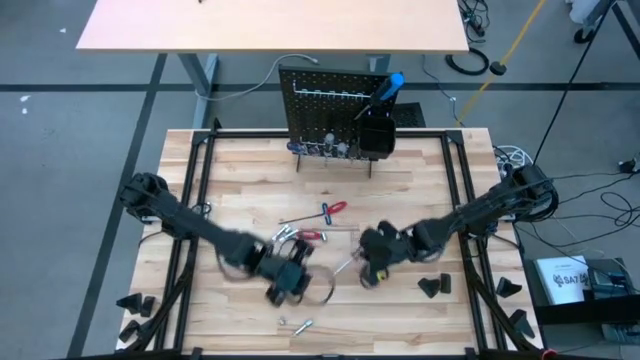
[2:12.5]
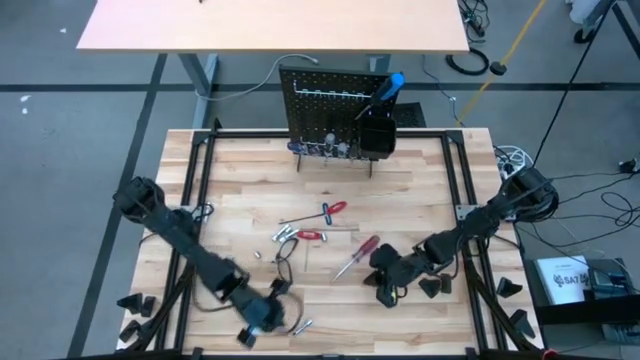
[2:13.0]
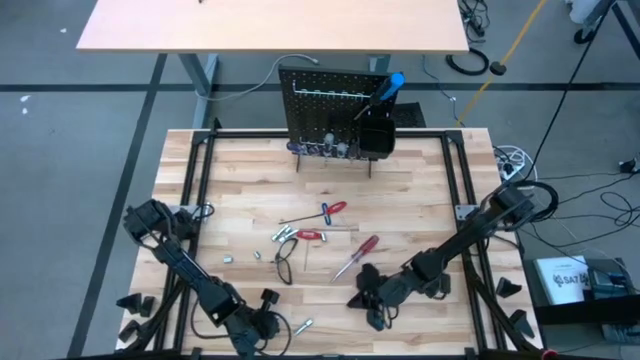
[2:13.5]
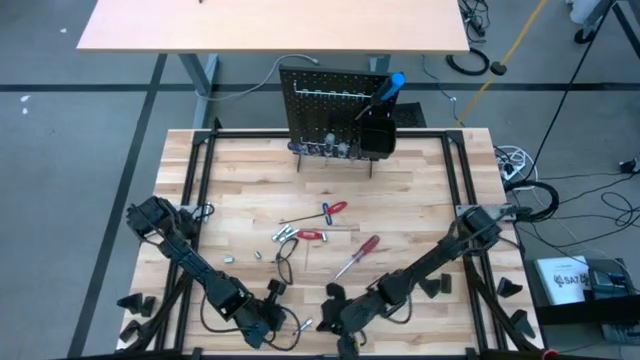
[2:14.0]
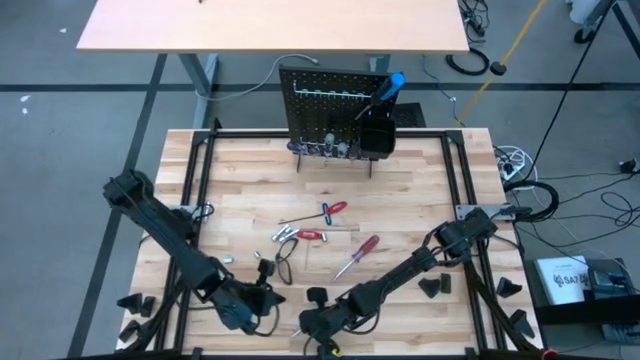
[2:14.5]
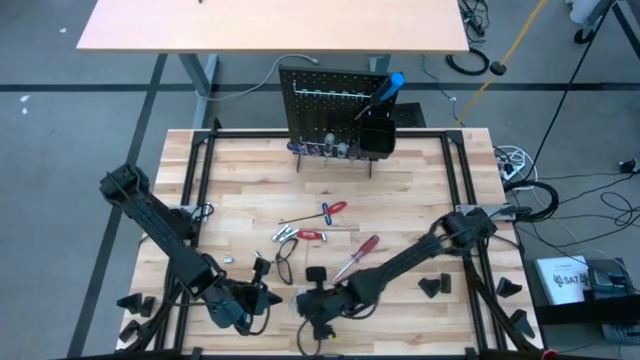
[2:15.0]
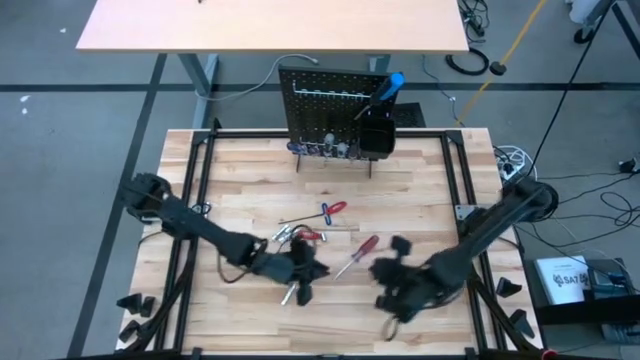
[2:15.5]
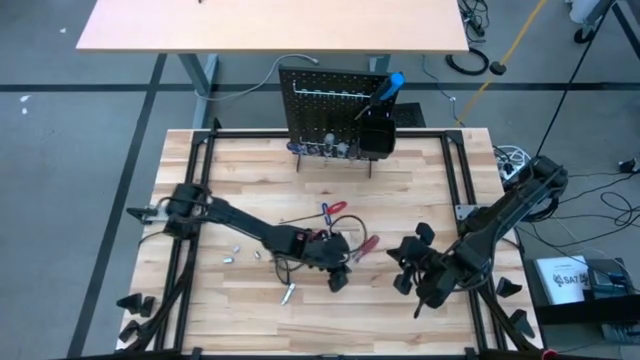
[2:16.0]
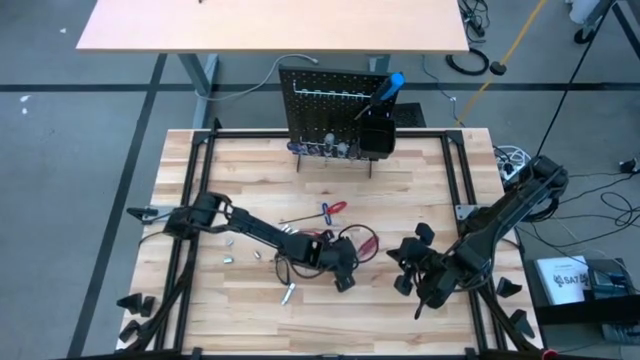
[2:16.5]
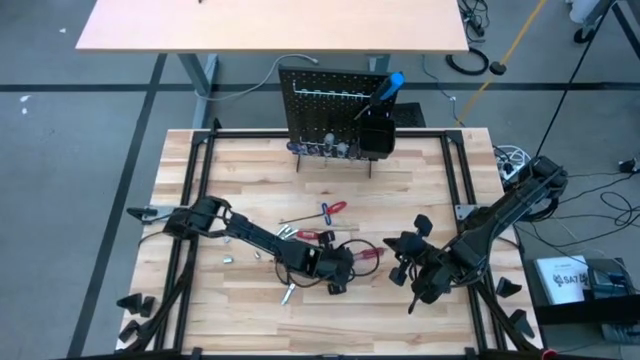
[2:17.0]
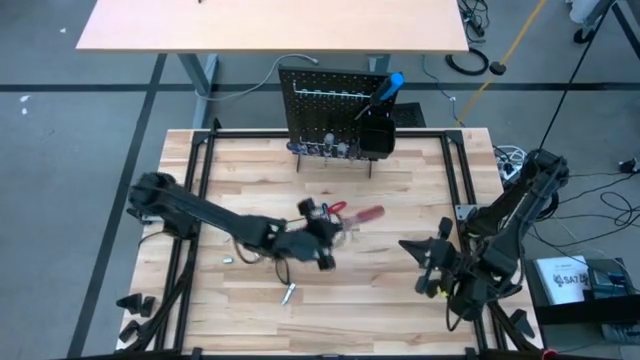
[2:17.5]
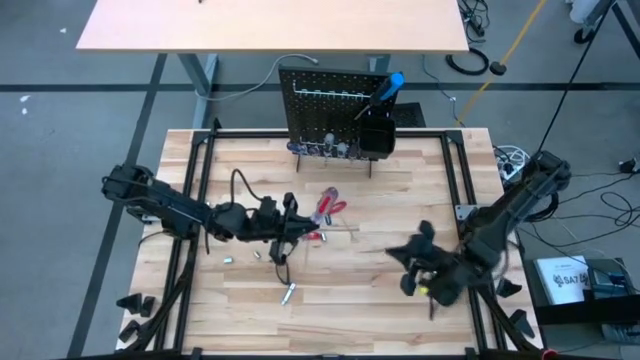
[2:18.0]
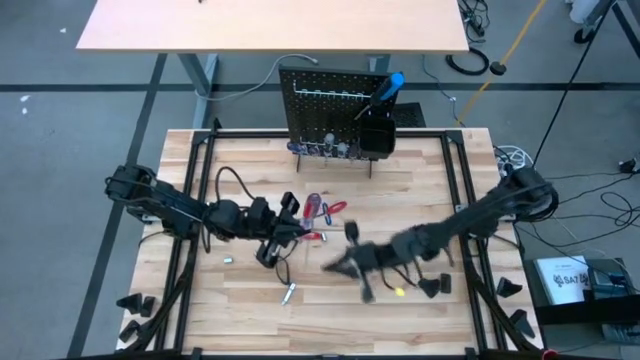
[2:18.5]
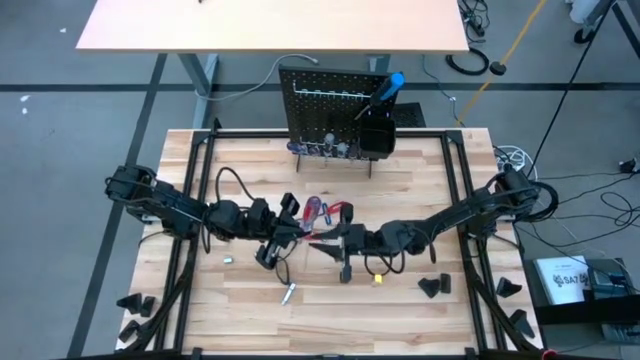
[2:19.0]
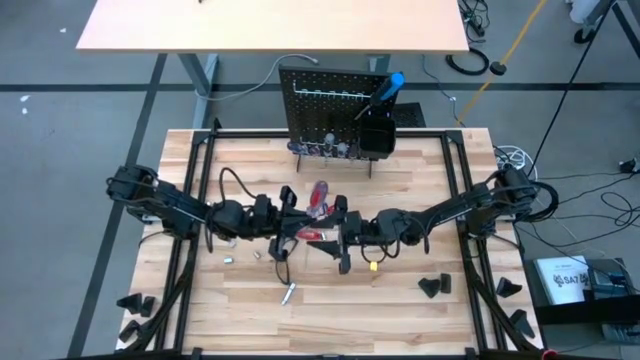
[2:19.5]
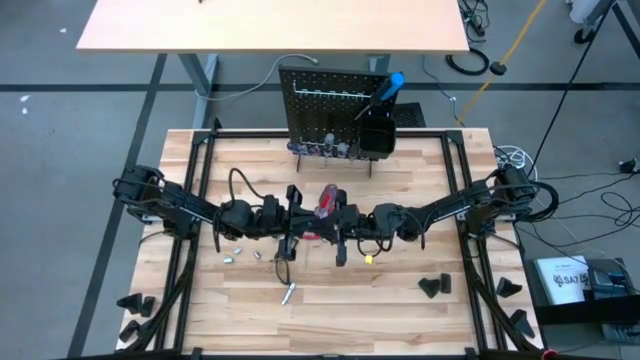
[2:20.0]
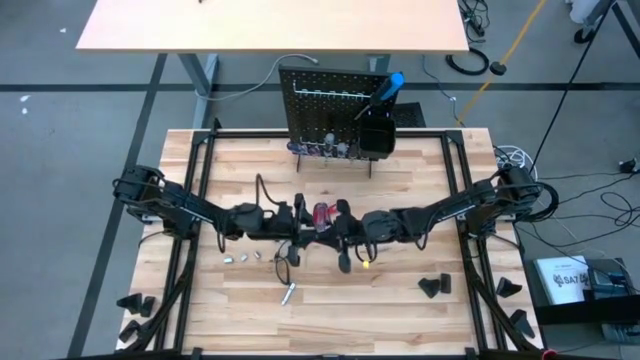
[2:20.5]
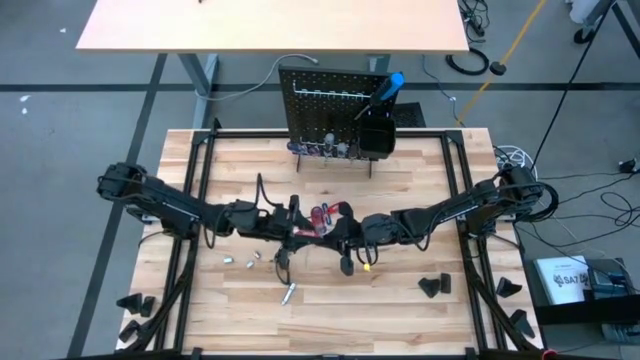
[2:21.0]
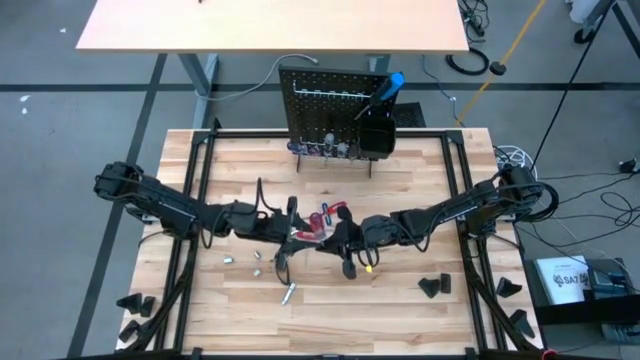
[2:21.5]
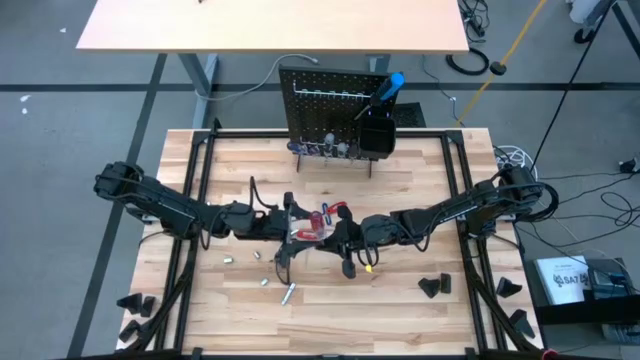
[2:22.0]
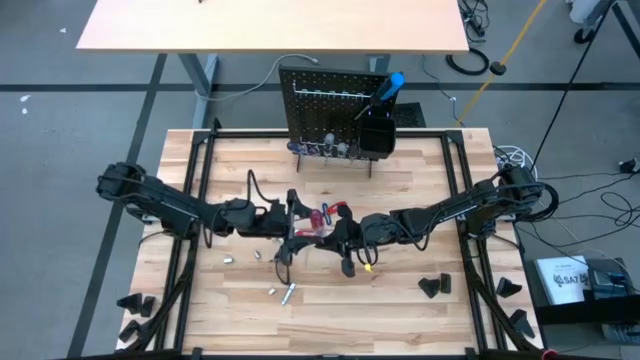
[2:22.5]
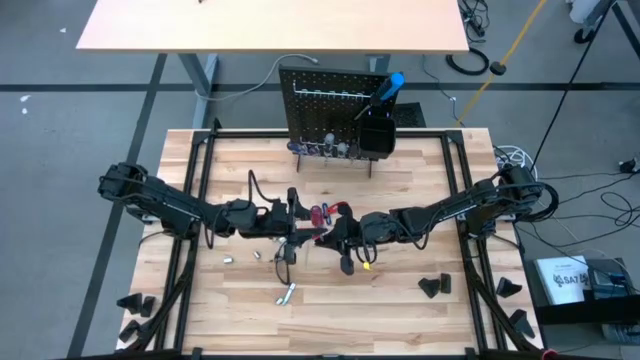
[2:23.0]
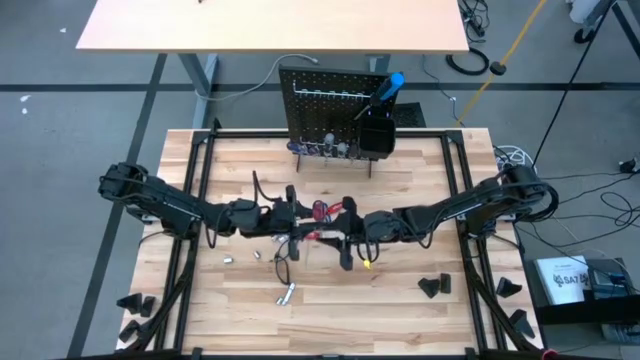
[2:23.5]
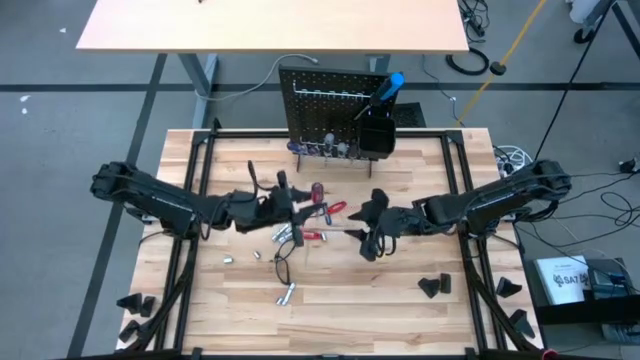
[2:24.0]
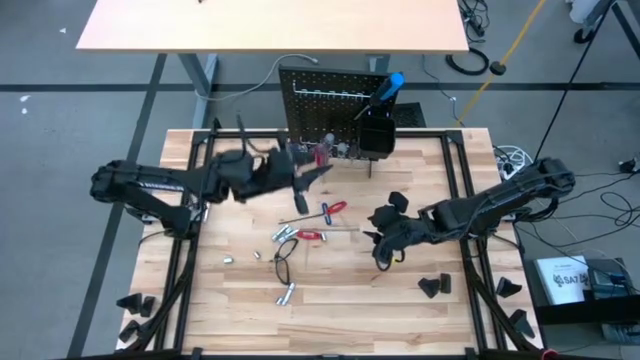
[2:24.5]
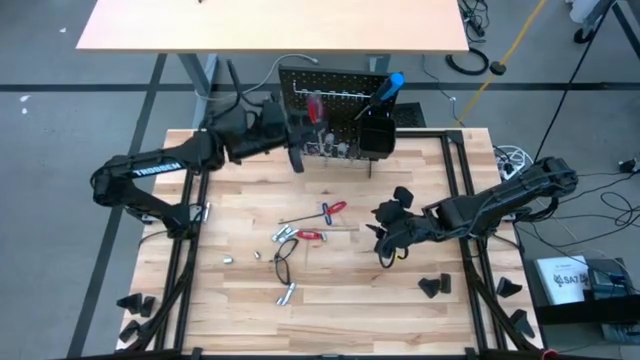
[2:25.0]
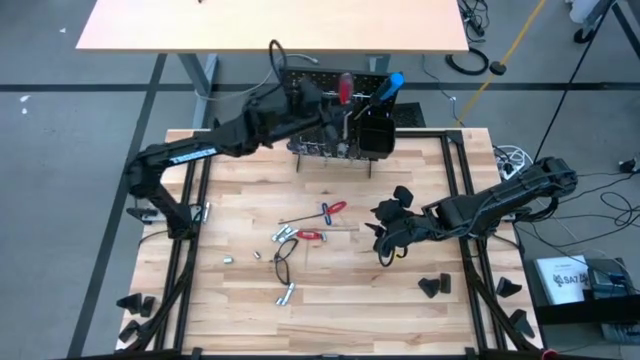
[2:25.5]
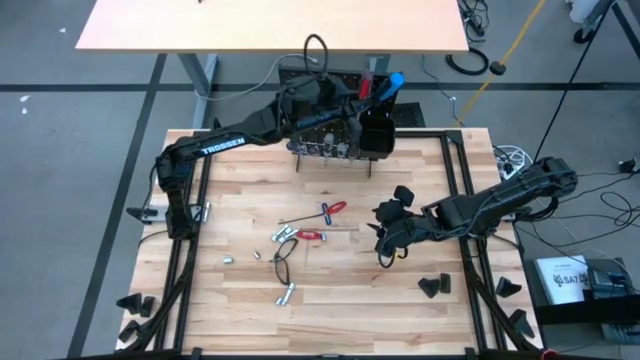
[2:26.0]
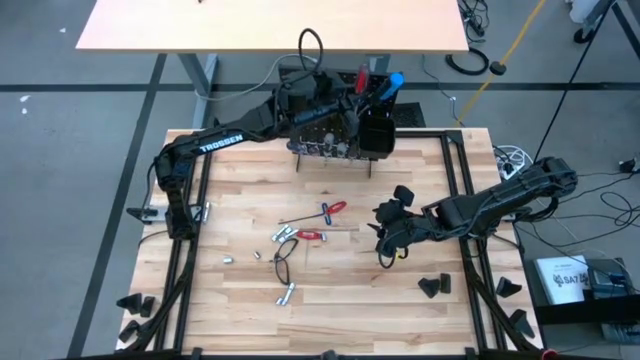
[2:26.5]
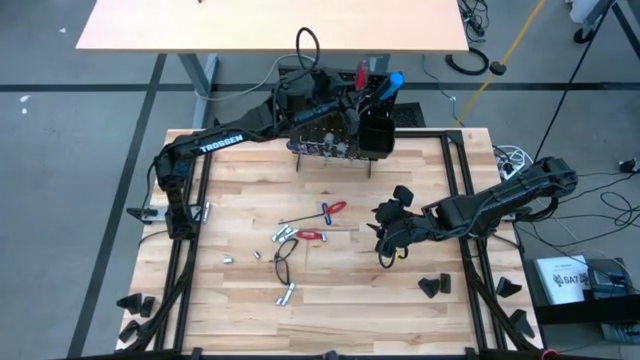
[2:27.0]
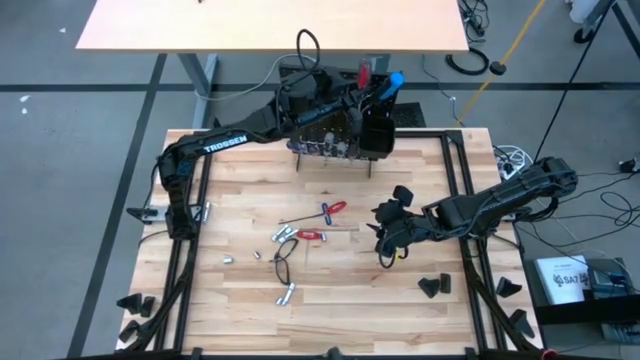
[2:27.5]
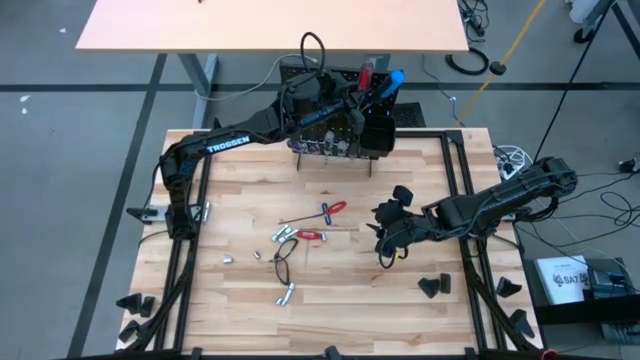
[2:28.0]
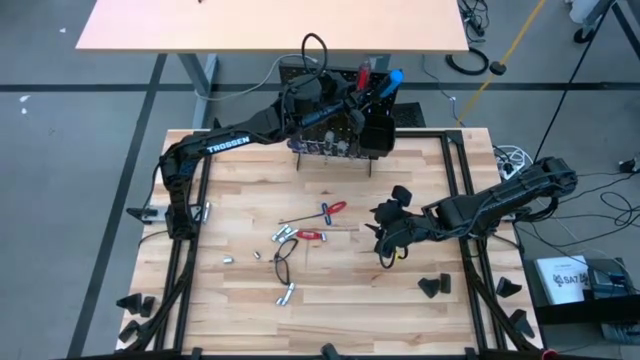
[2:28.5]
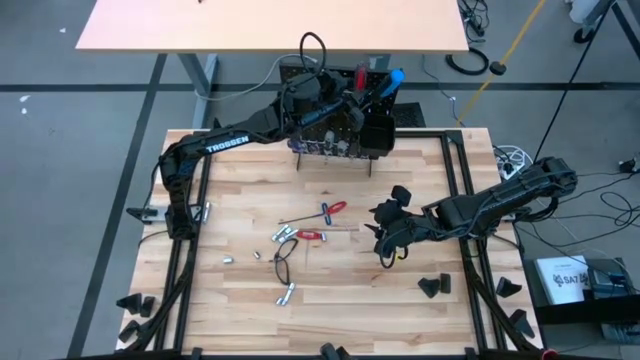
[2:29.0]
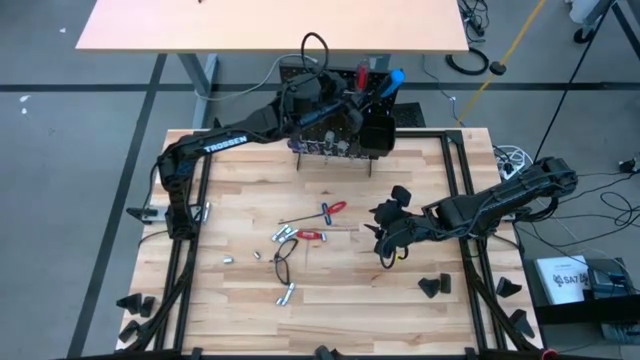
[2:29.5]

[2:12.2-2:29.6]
Task: Hang tools onto peg board
Hang the red screwdriver onto the peg board

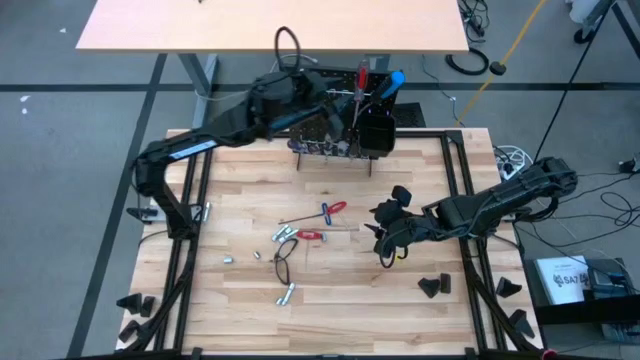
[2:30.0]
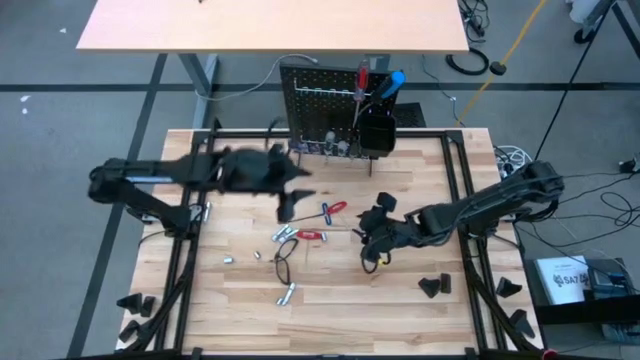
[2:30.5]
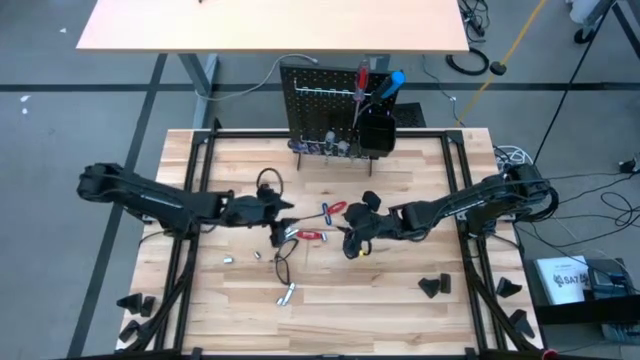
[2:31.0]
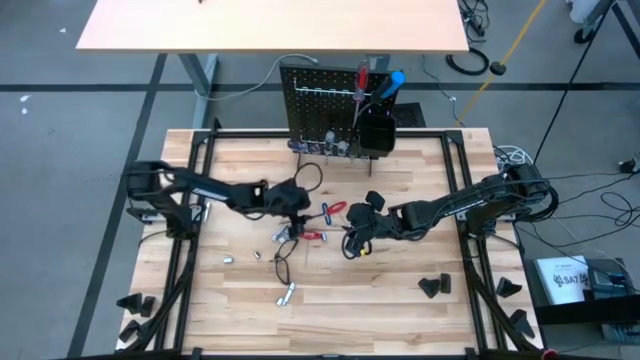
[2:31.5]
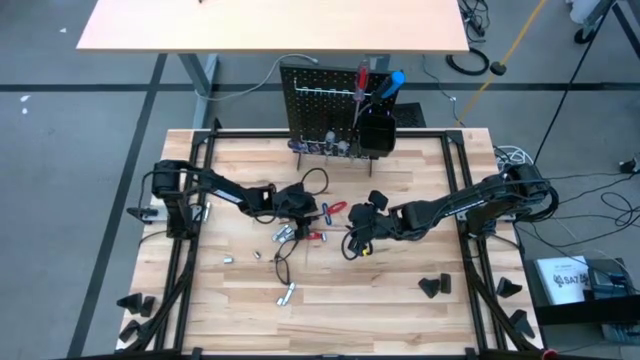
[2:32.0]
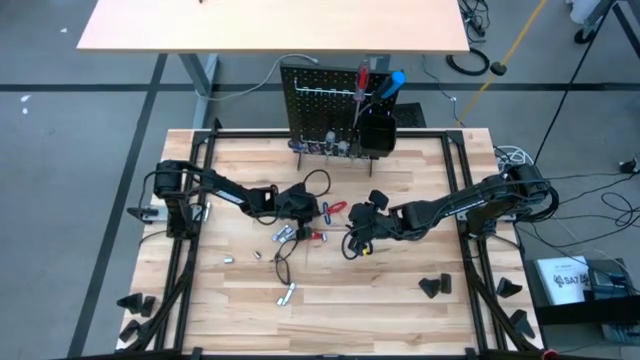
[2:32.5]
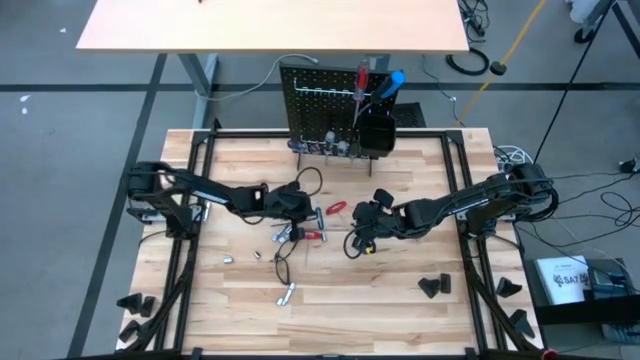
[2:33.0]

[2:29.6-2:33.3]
Hang the blue pick tool onto the peg board
